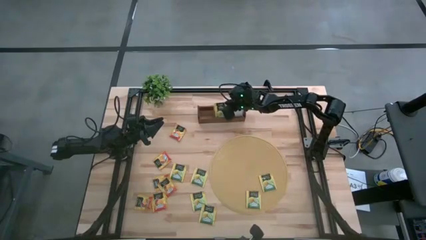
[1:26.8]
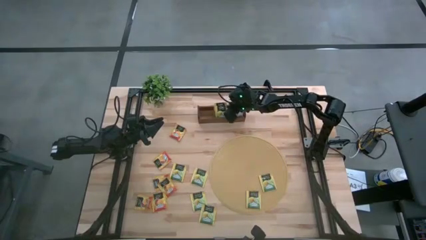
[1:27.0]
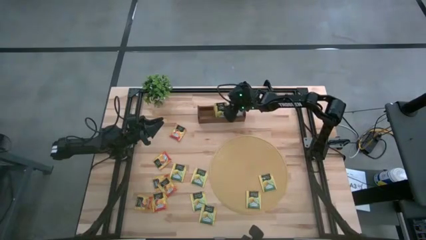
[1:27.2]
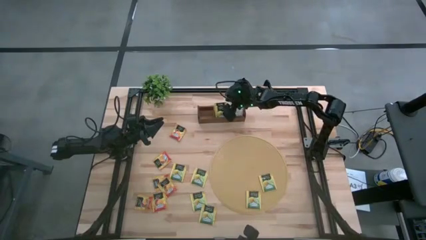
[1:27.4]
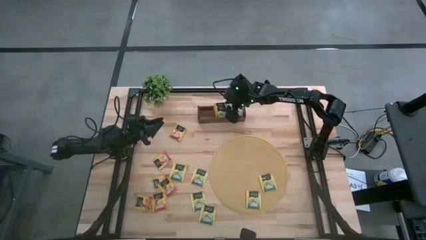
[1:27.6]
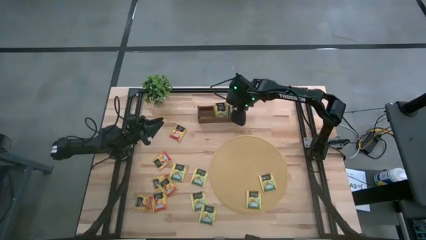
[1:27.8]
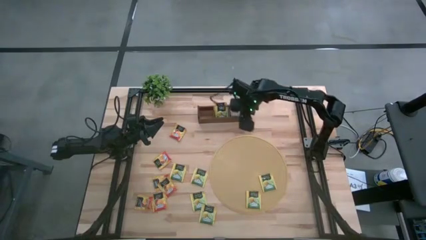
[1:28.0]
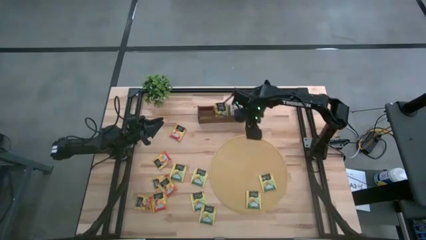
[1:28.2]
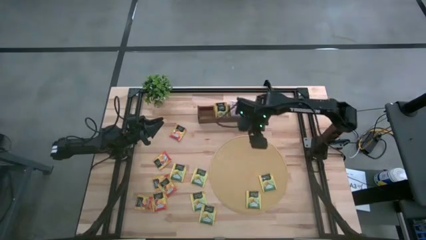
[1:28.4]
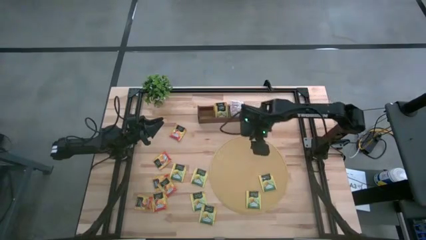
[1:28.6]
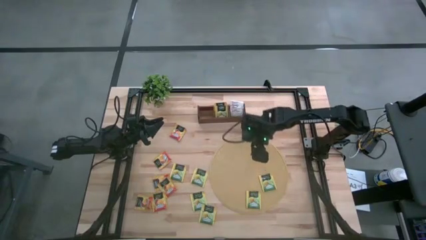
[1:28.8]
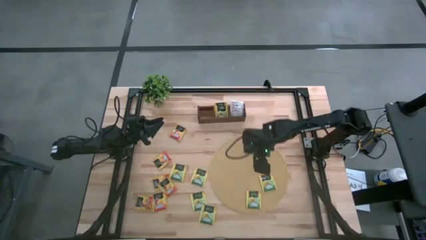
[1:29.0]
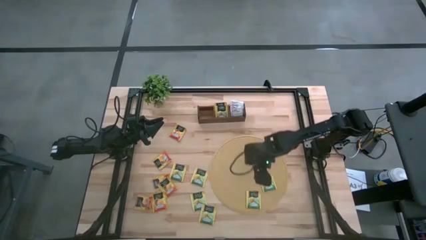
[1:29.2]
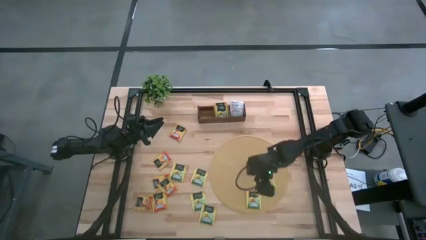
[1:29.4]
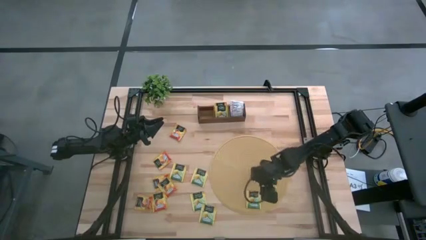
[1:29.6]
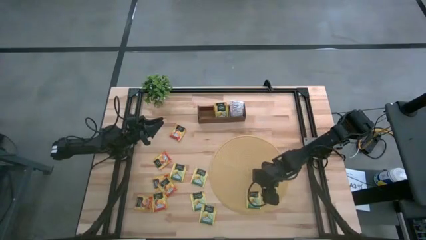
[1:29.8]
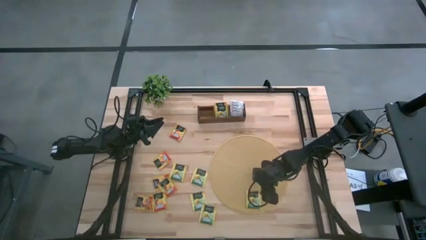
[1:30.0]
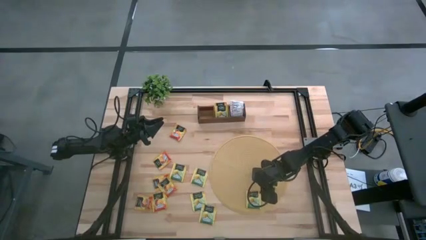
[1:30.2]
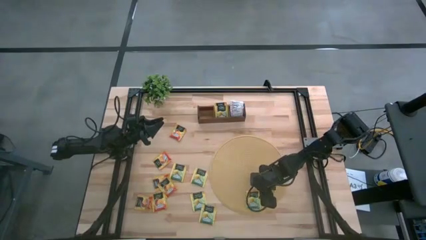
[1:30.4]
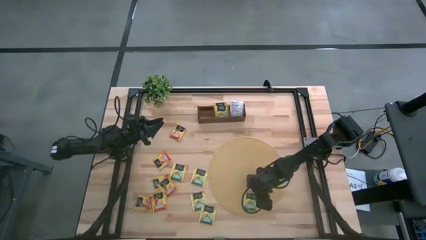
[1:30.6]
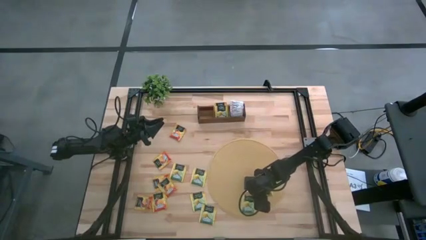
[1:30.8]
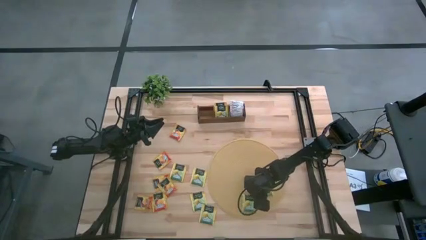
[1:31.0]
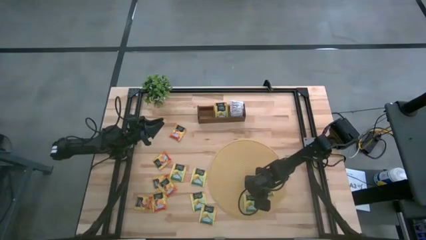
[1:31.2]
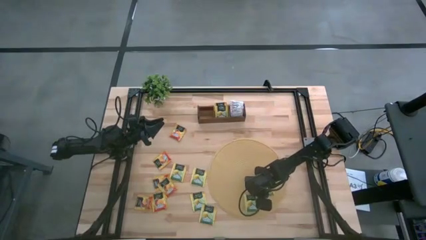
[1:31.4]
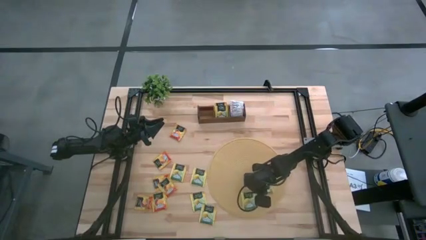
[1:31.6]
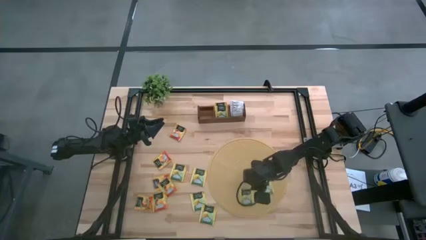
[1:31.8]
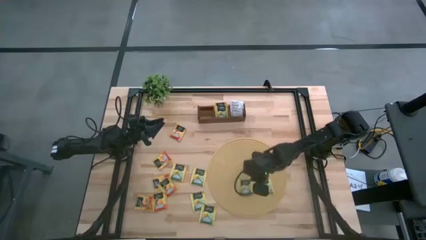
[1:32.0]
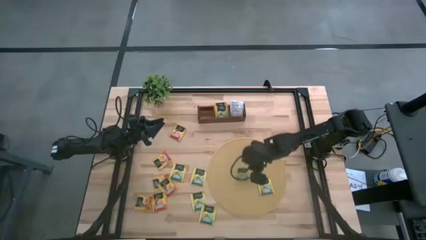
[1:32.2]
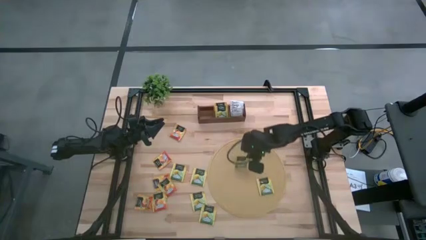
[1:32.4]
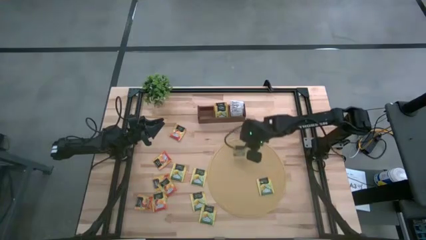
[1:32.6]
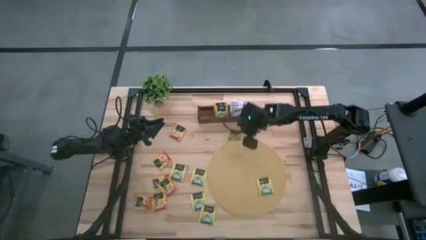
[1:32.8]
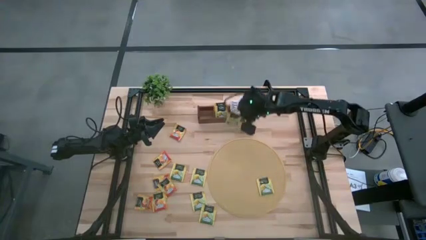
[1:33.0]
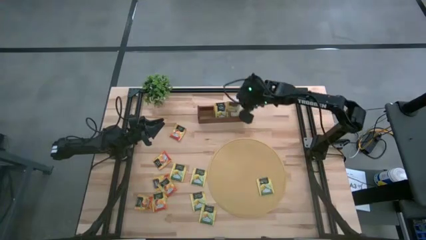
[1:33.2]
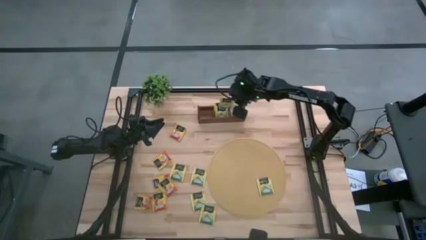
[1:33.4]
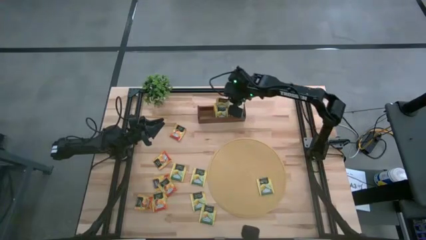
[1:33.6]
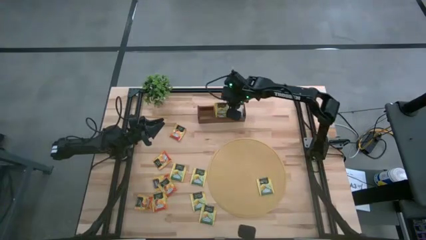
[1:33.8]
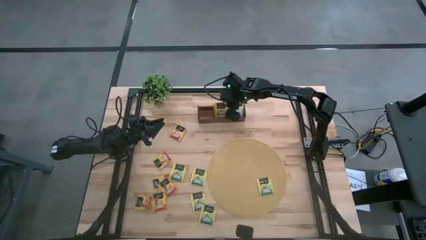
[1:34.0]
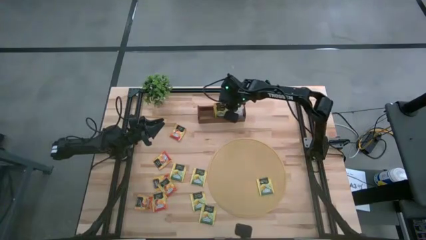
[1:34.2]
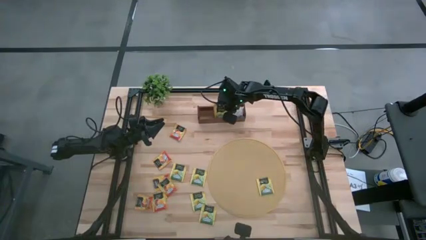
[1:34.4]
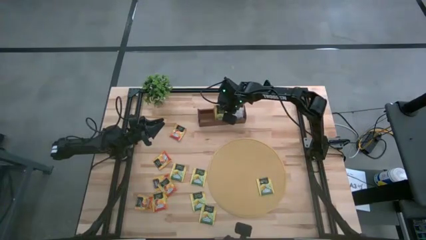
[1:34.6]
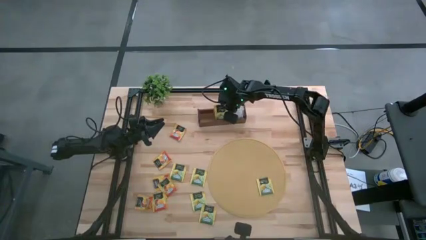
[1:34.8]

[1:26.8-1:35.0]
Task: Pick & Place Tea
Put the yellow tea bag into the middle section of the wooden organizer

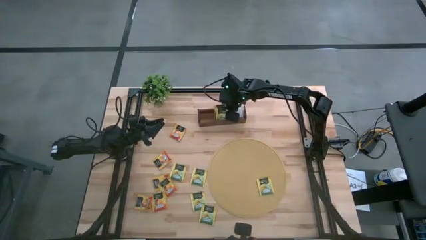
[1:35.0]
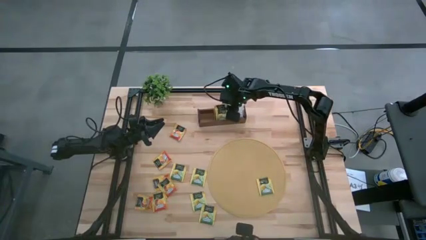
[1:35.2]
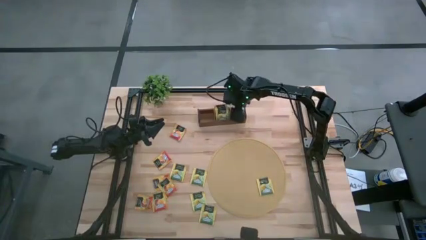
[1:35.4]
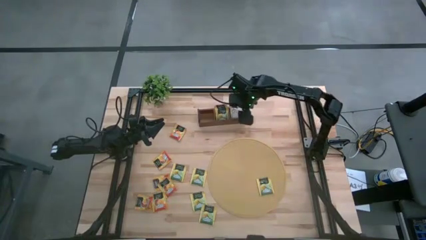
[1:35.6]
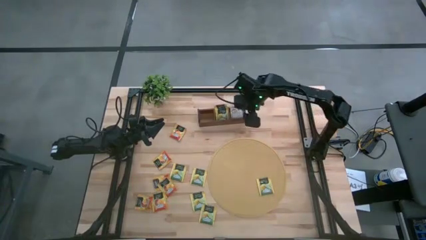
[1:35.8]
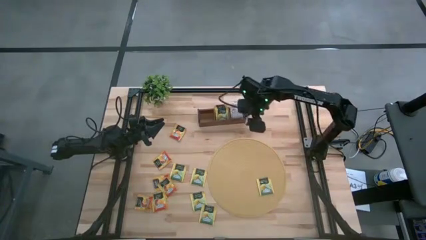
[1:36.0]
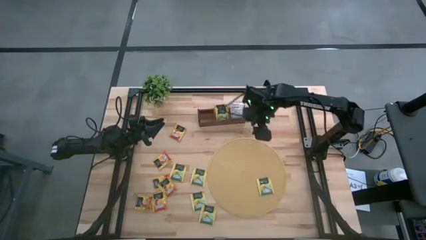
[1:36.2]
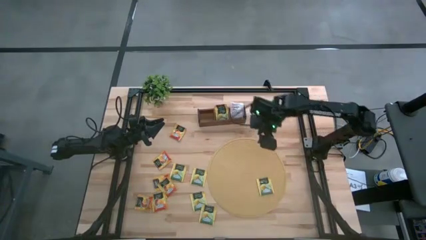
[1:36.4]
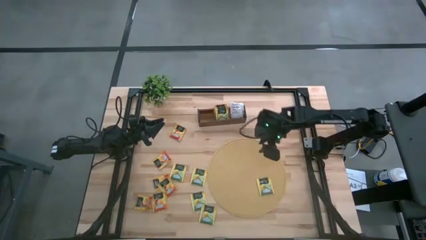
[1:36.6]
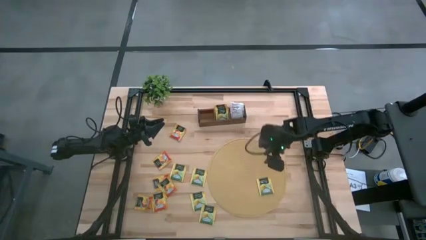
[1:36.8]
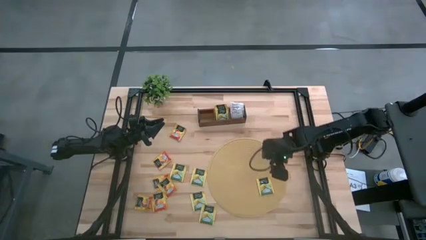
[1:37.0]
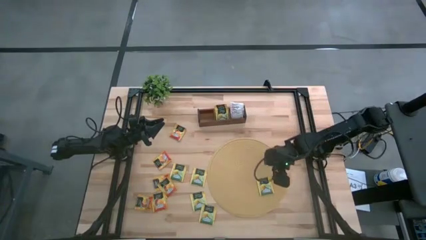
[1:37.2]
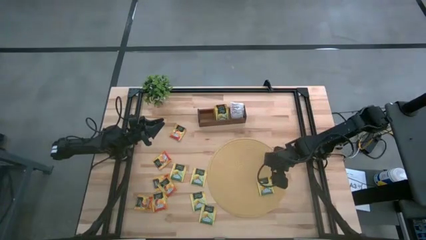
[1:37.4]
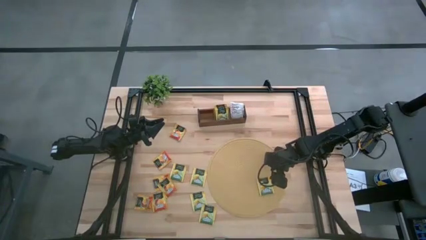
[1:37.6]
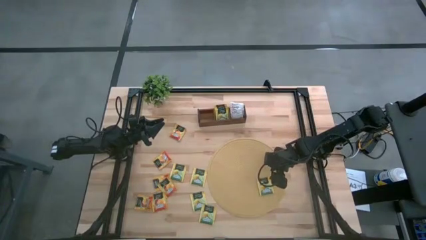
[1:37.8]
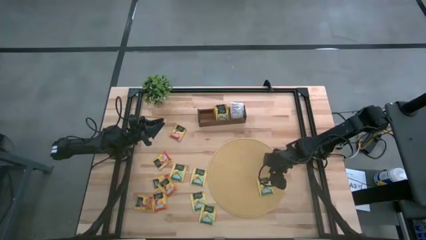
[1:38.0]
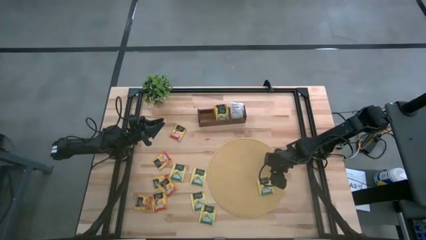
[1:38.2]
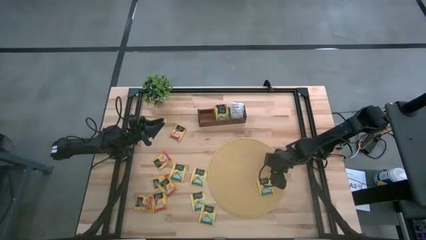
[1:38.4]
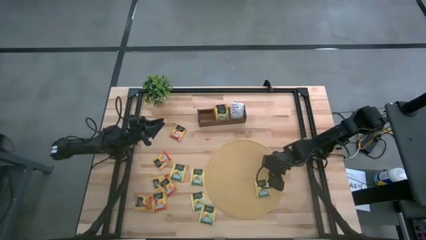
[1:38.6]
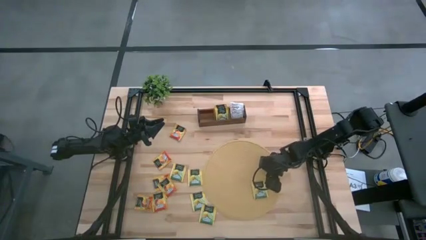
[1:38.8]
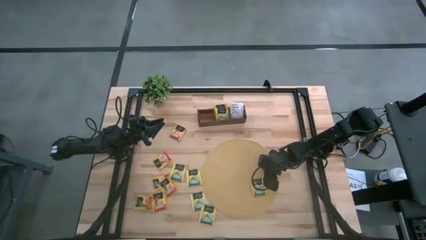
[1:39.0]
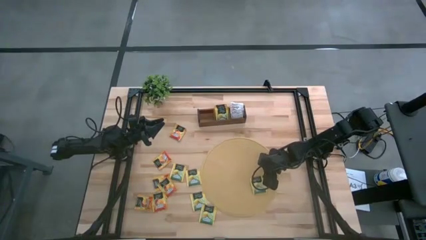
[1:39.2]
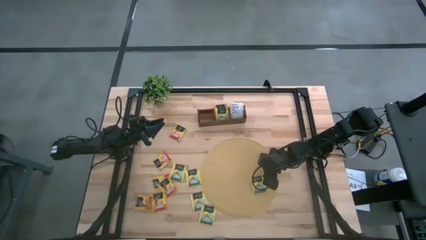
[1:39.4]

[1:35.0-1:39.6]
Put the yellow tea bag into the middle section of the wooden organizer

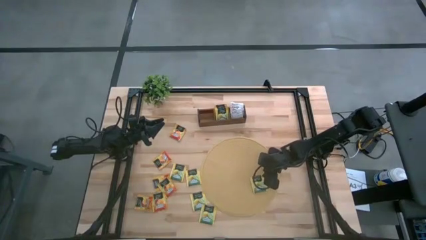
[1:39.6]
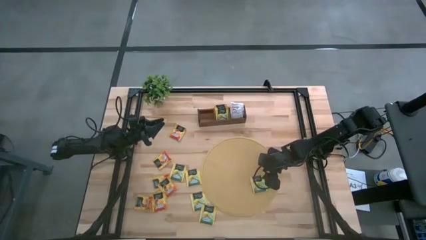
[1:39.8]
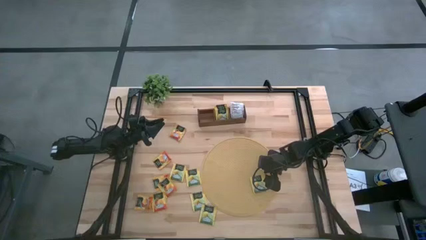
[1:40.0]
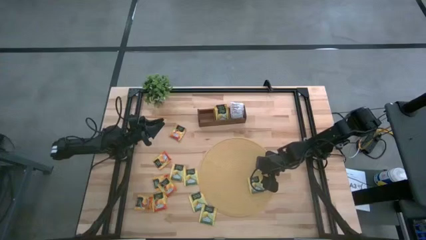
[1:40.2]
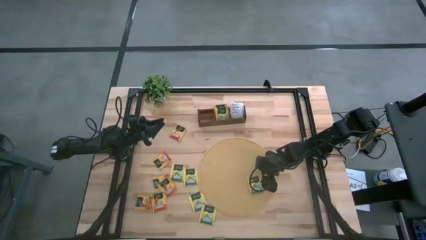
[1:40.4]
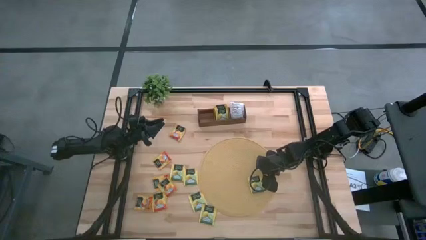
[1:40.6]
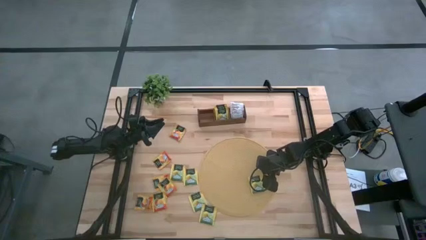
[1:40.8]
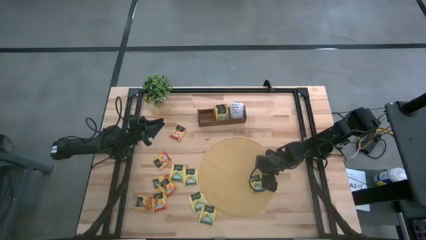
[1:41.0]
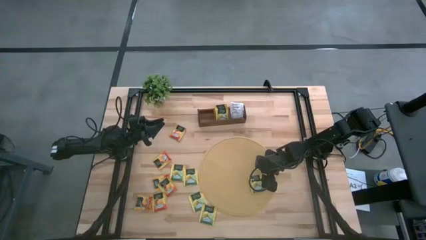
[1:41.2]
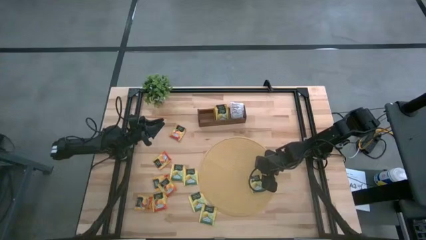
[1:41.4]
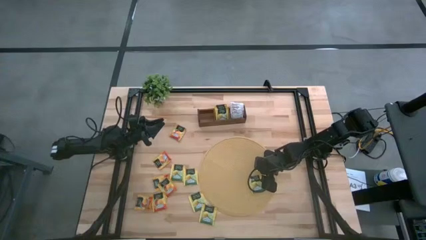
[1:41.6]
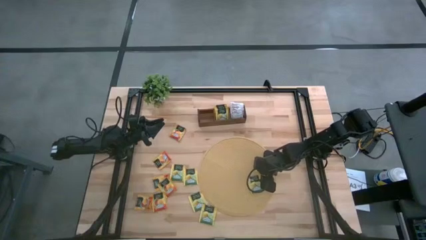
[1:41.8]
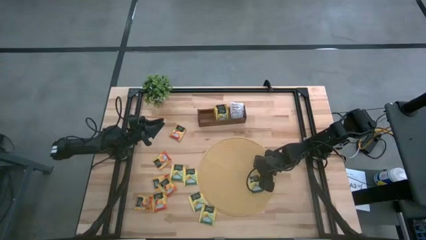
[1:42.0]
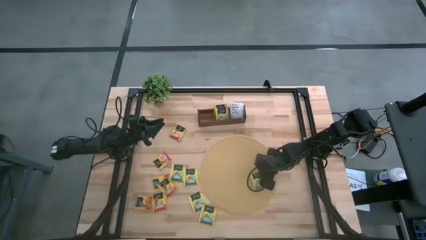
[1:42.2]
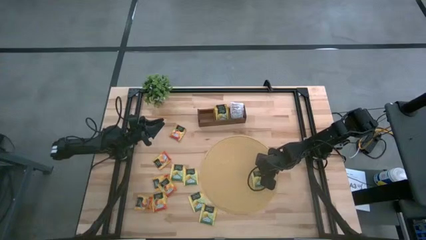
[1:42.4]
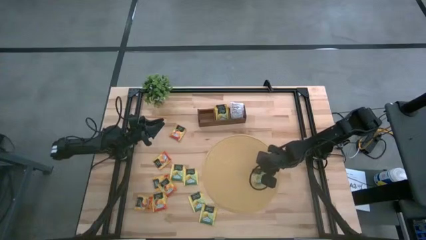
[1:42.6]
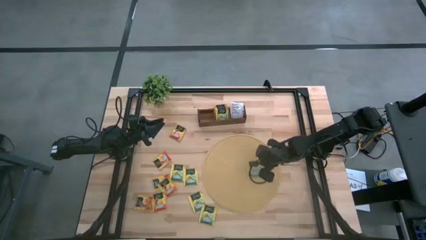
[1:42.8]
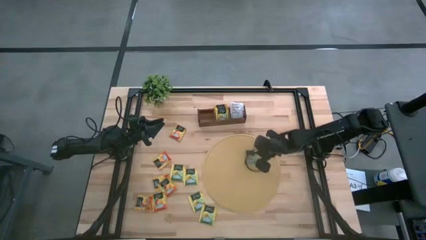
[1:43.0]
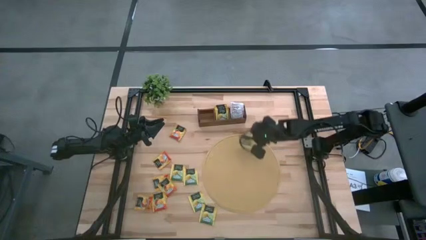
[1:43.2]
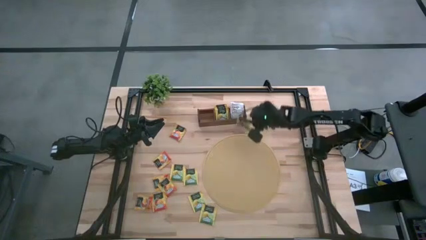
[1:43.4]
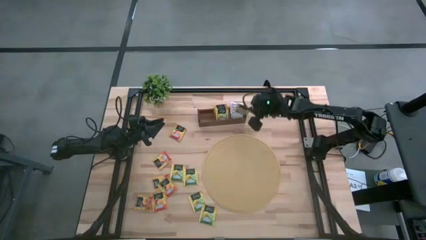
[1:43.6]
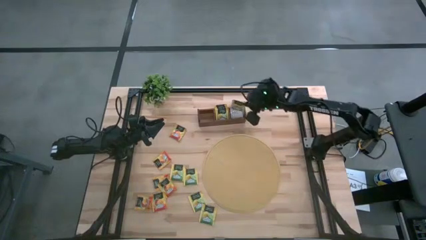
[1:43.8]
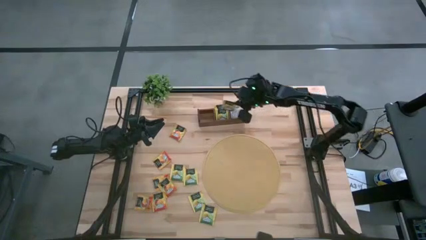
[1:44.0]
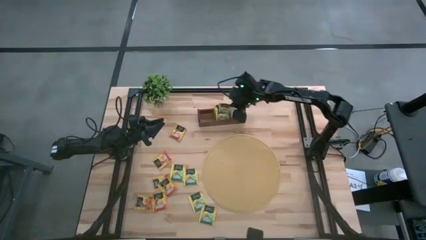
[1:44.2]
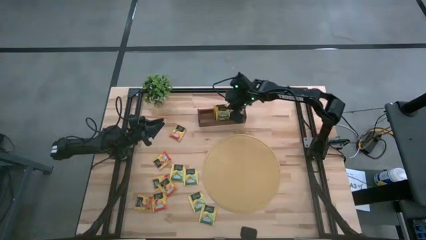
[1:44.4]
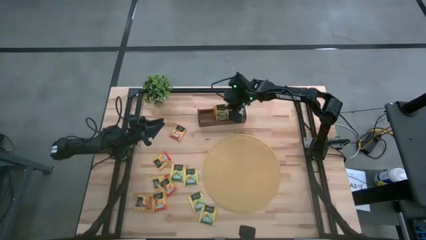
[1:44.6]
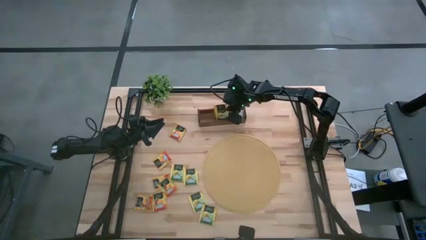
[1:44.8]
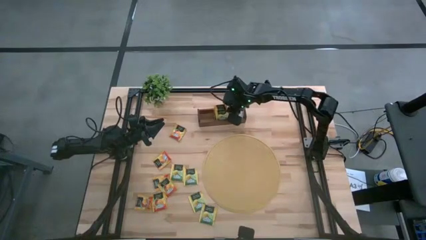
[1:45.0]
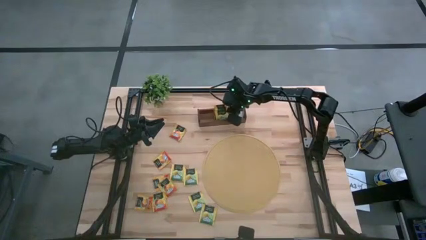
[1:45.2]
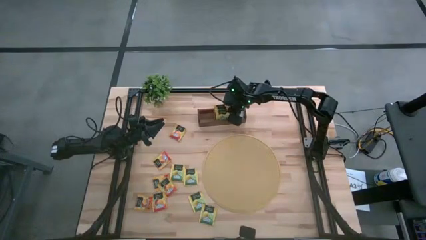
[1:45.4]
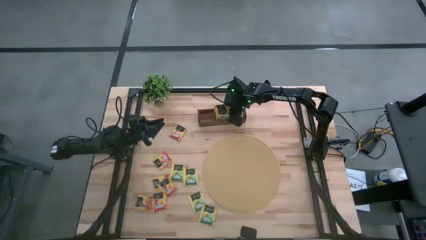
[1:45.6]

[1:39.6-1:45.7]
Put the yellow tea bag into the middle section of the wooden organizer
